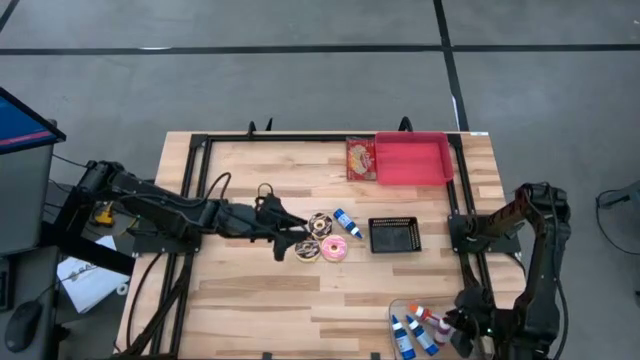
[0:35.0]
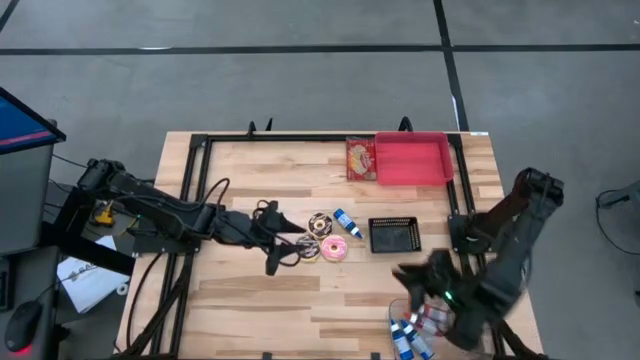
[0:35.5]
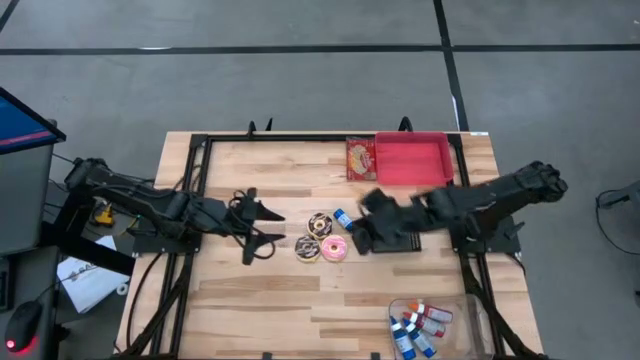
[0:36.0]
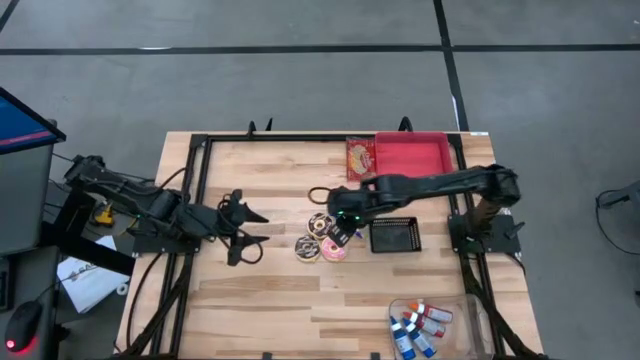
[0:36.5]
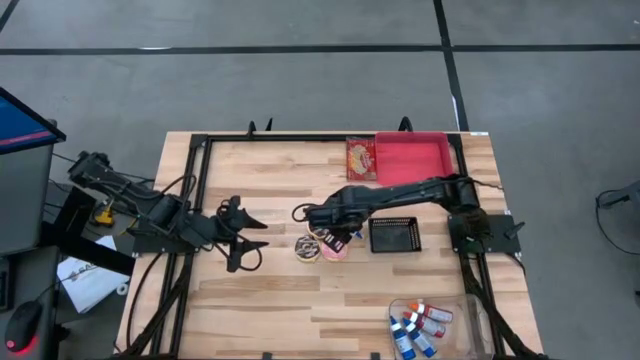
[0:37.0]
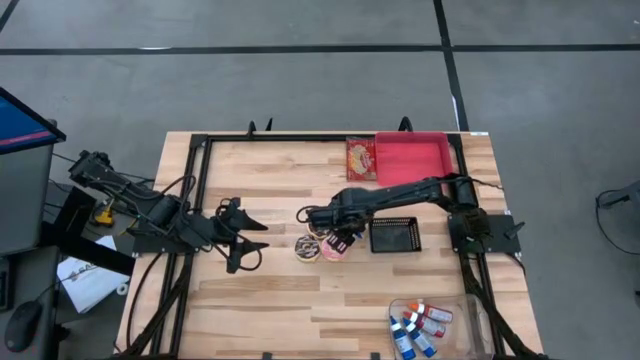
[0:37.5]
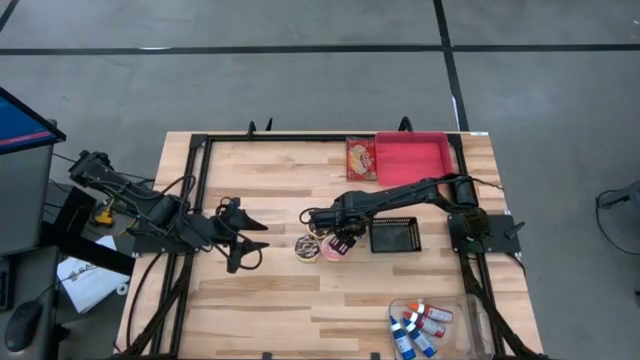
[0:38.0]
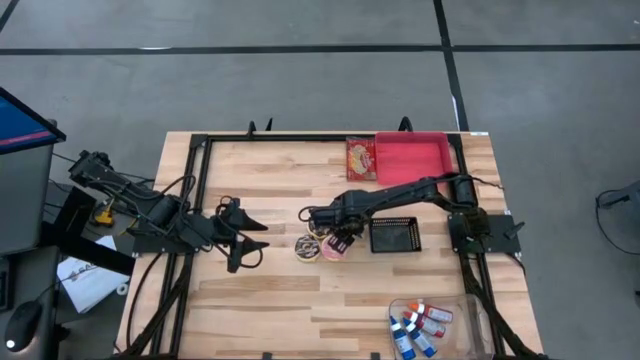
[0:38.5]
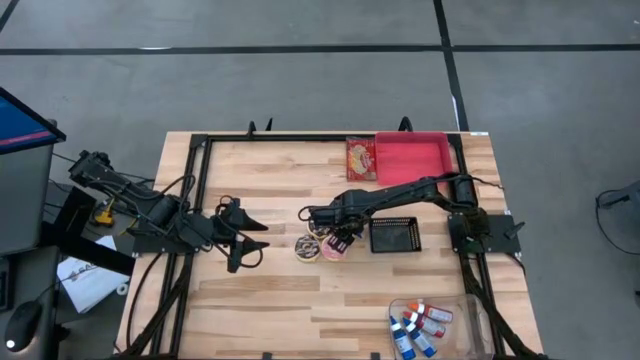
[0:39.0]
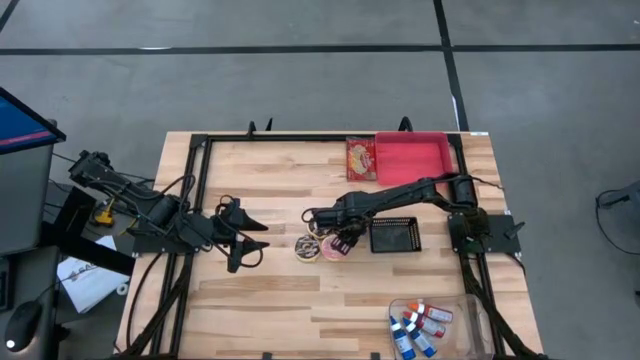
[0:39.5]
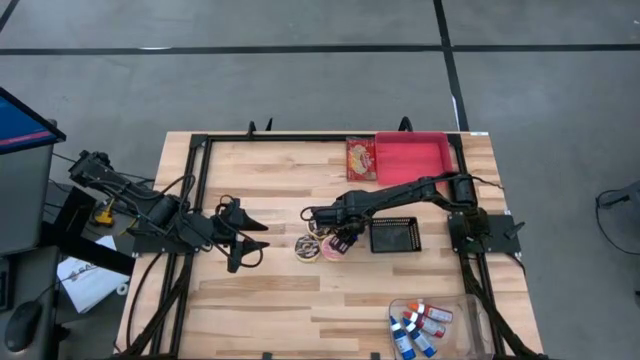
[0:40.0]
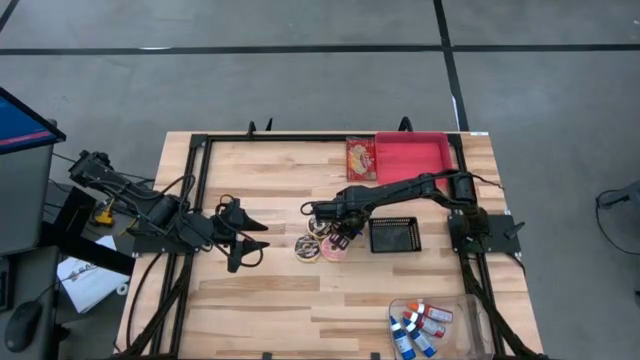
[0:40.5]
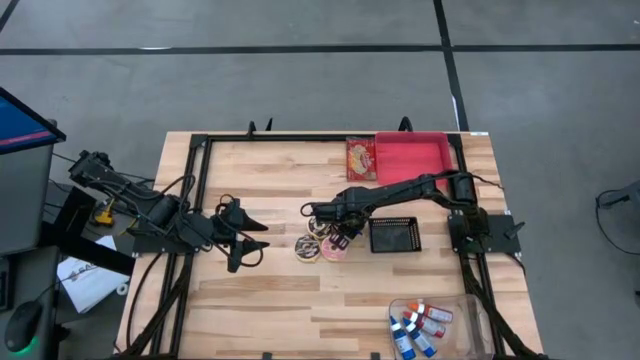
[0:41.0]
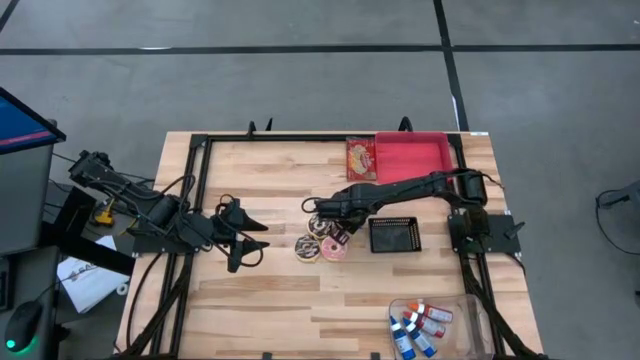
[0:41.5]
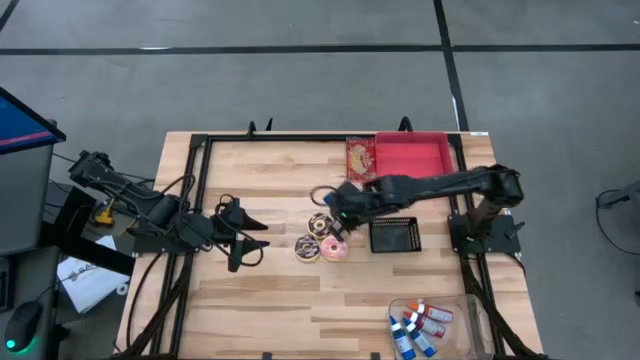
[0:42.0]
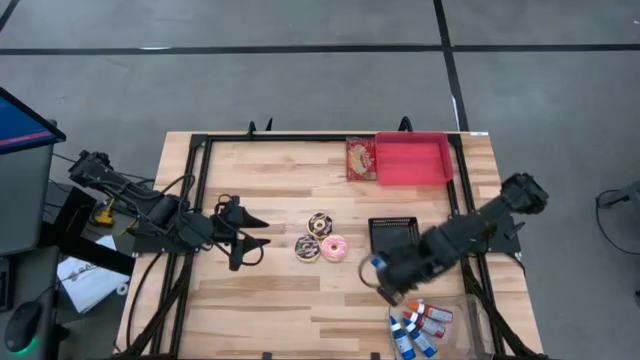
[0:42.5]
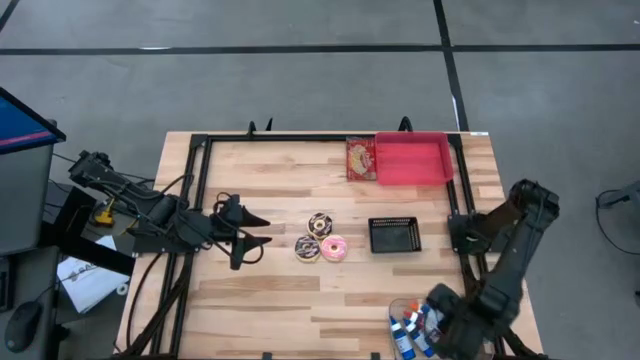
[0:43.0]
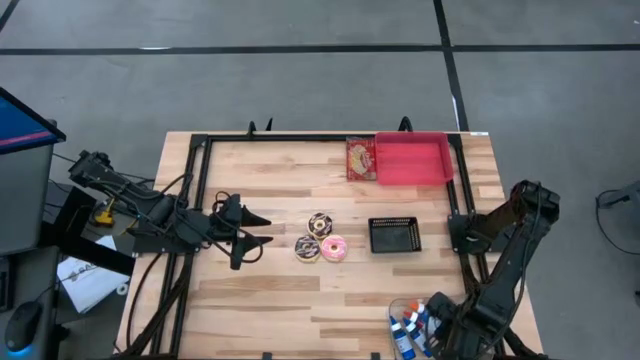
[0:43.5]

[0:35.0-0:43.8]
Put the blue food coloring bottle into the transparent bin

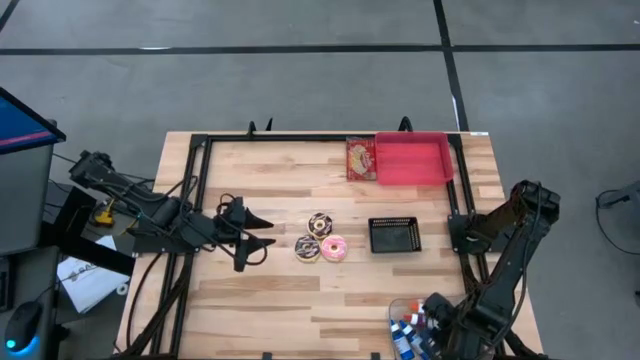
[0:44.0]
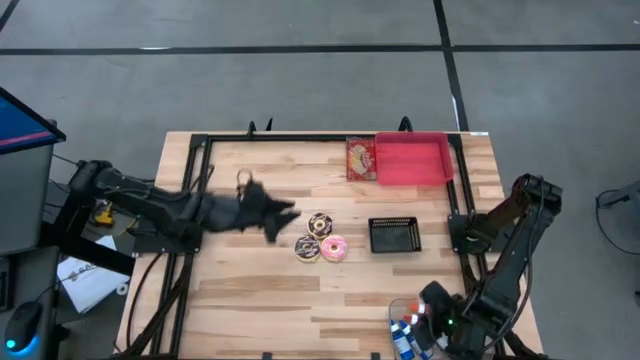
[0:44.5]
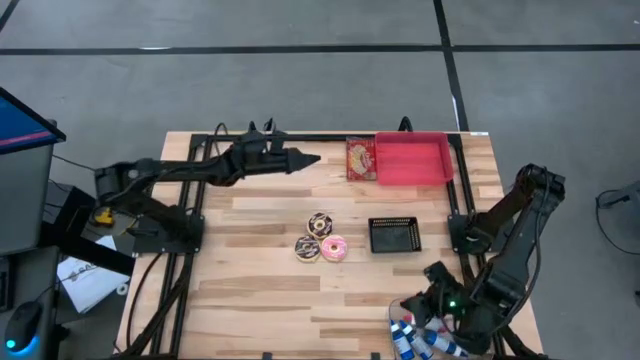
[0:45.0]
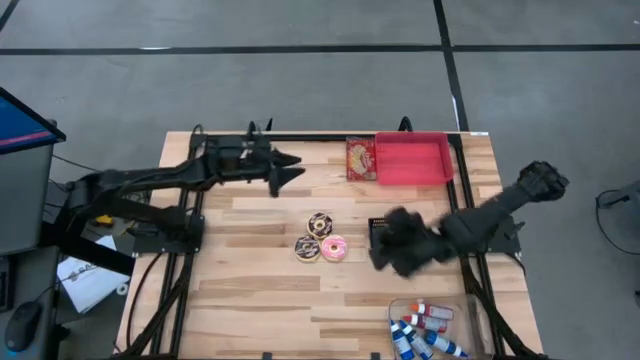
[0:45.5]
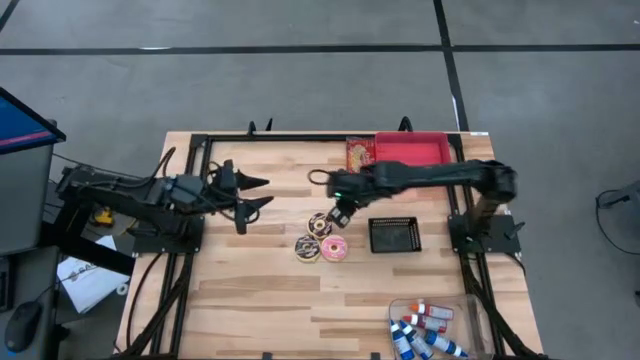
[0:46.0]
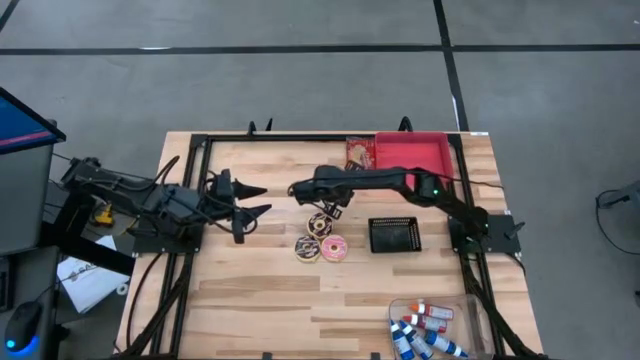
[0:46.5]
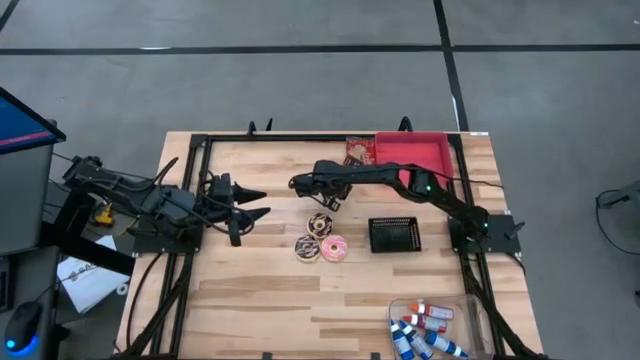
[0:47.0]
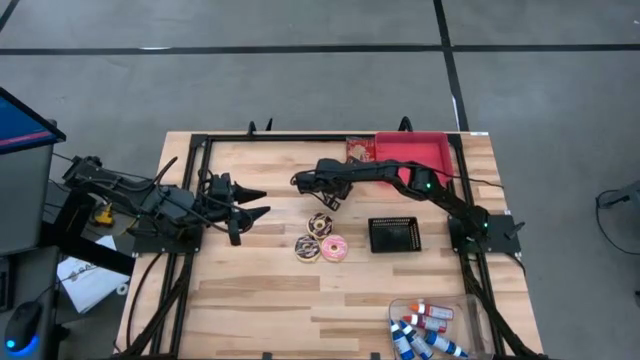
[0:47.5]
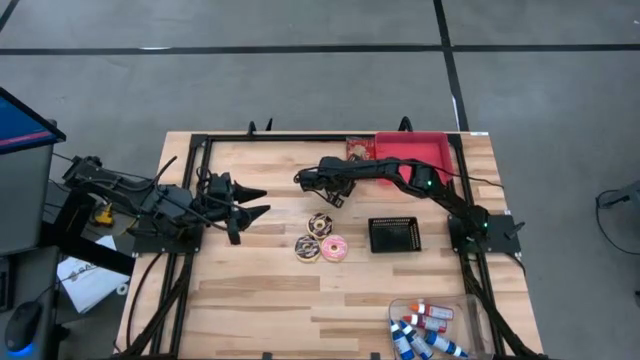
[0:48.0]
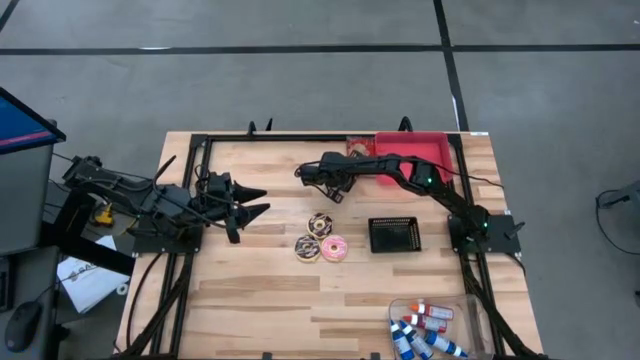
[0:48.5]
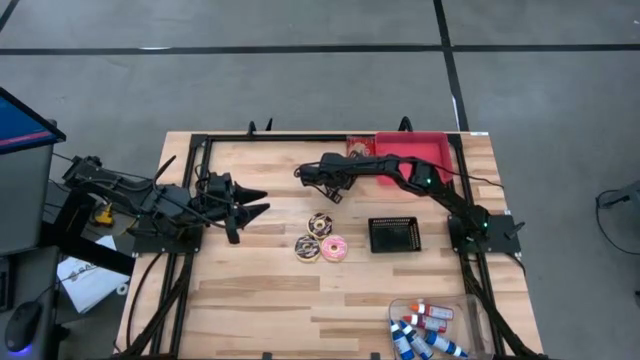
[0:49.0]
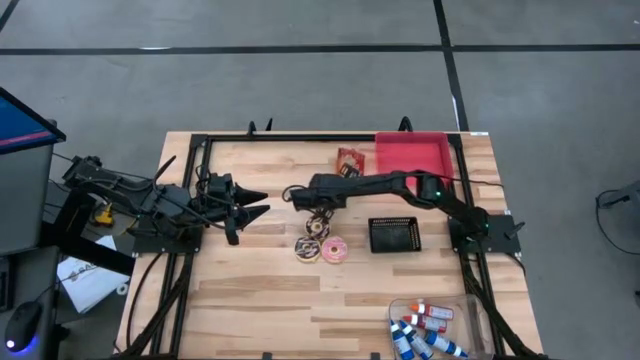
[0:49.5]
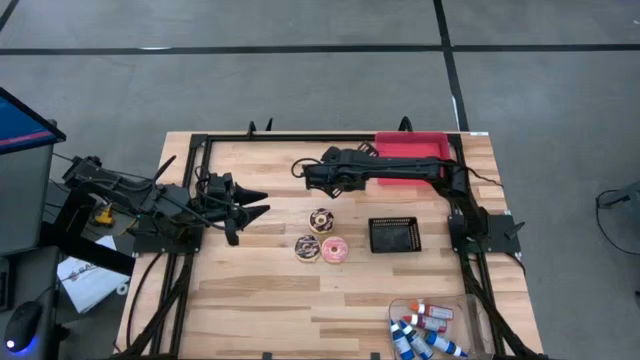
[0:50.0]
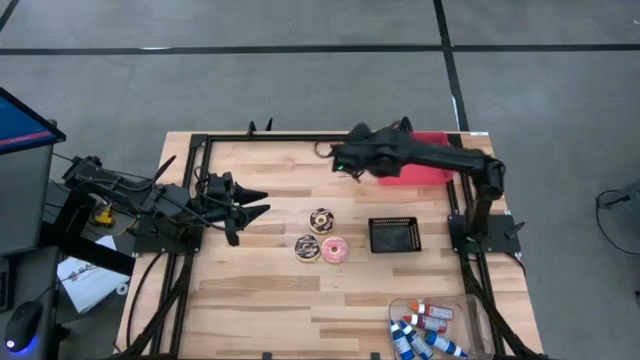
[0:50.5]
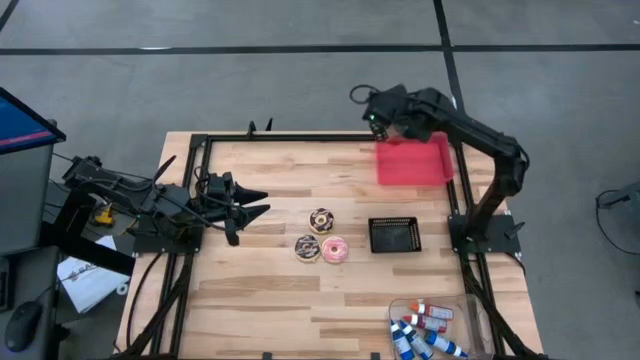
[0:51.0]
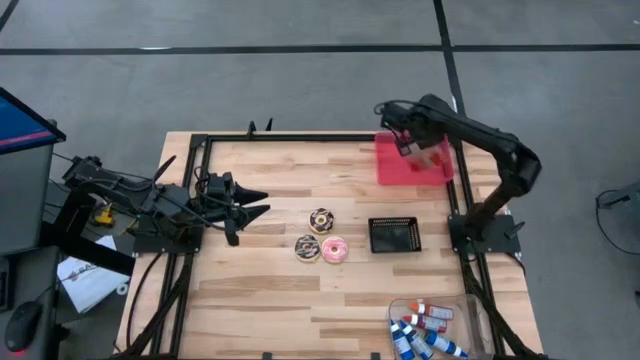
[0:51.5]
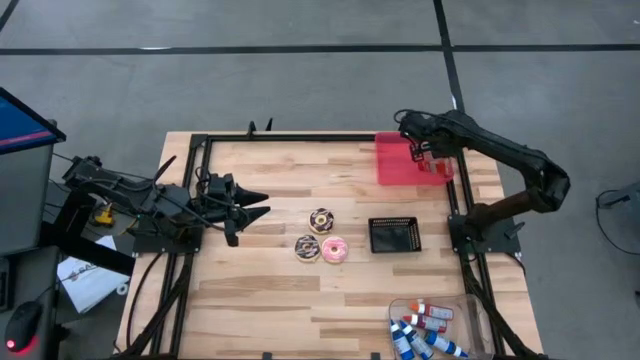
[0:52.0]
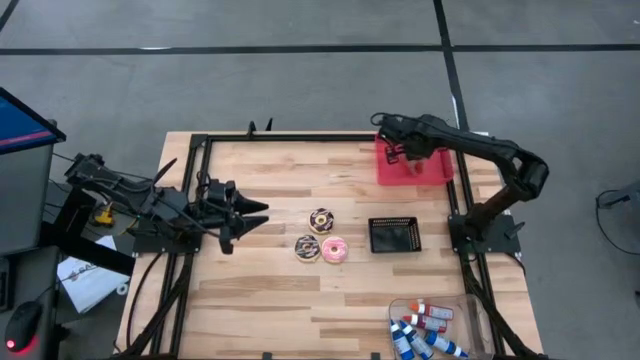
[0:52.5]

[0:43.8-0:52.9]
Put the red popcorn bag into the red bin

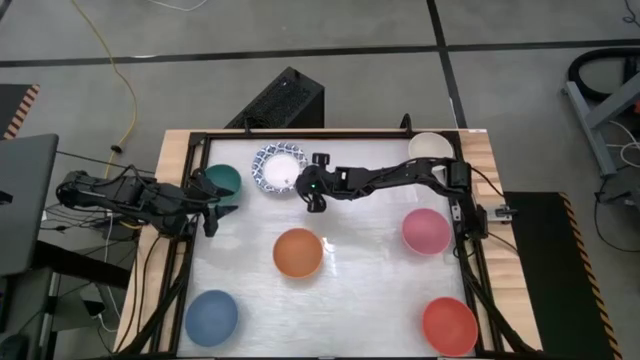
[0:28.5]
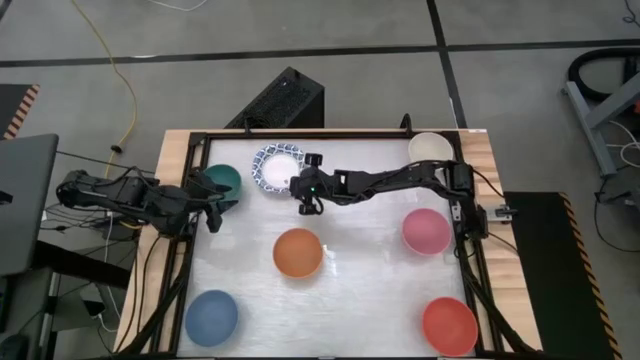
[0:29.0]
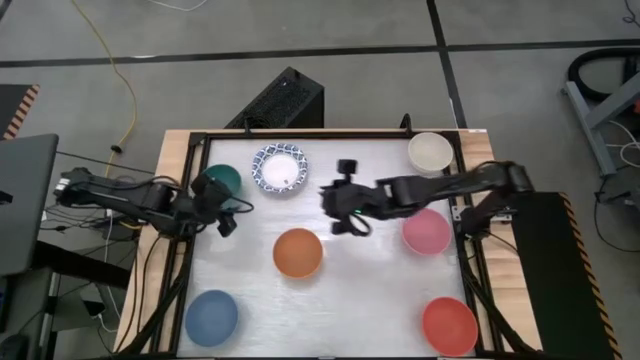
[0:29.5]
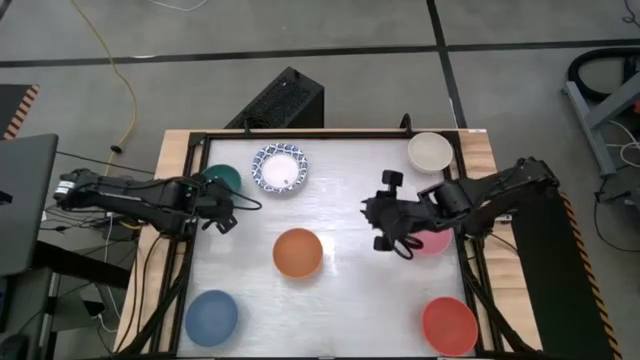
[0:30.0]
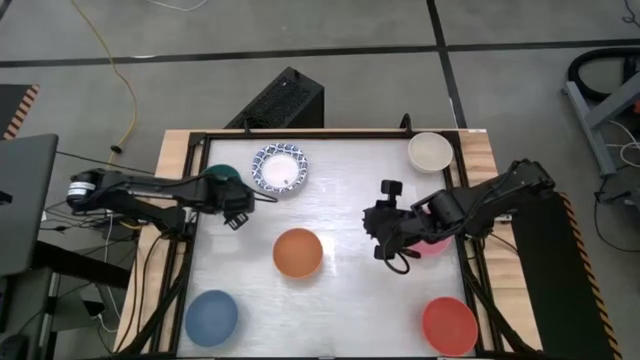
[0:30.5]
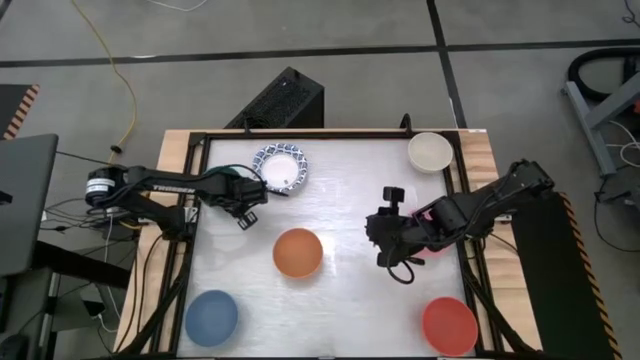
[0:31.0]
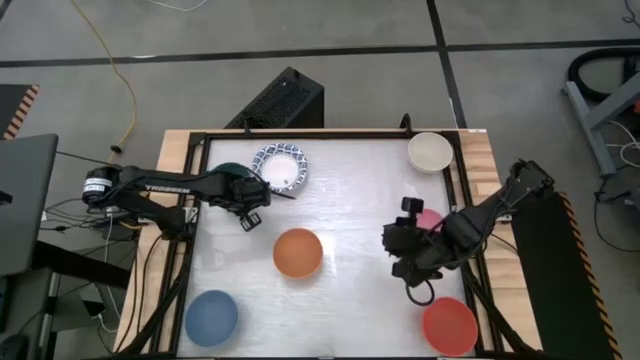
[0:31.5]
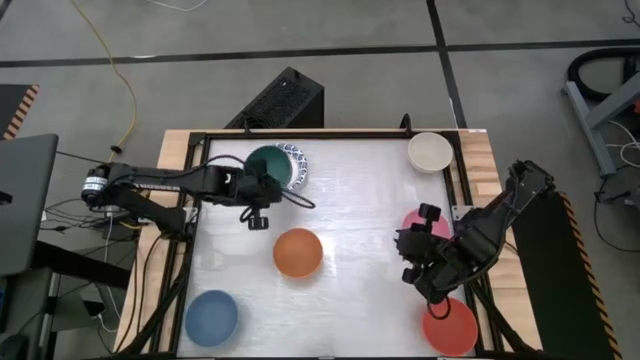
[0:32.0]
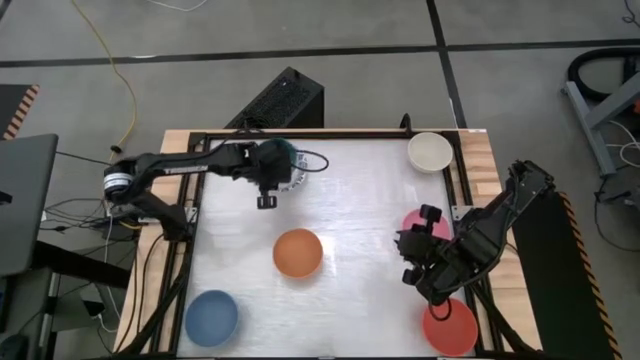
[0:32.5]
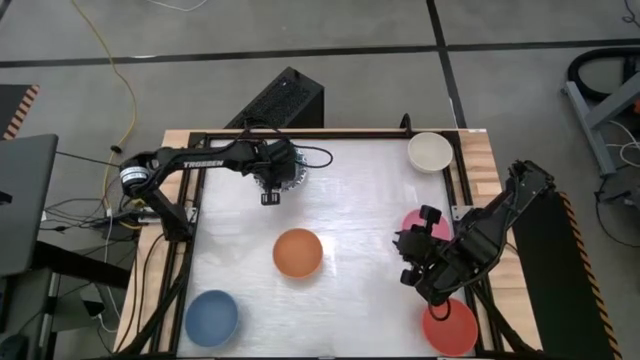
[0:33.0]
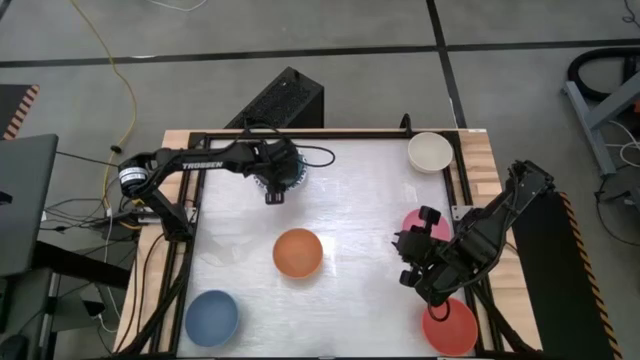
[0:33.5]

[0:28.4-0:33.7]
Stack the green bowl on the blue patterned bowl
